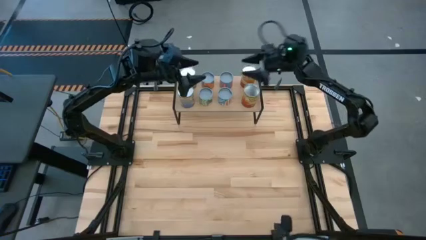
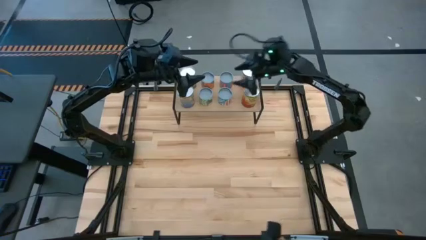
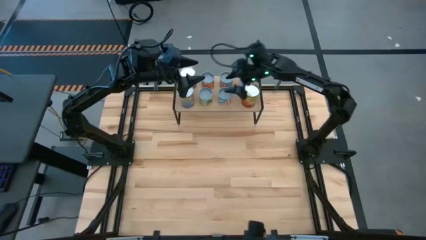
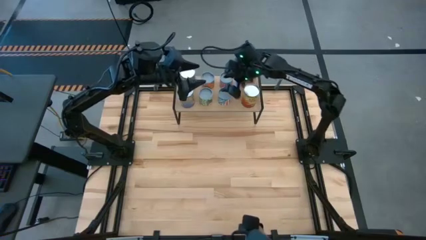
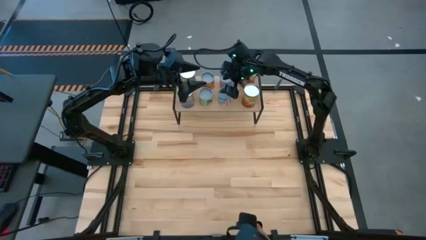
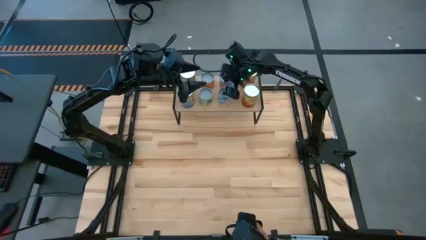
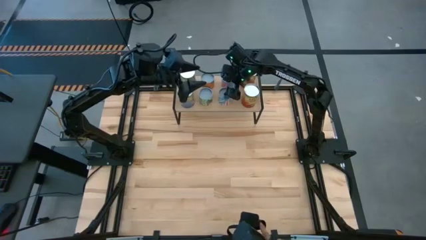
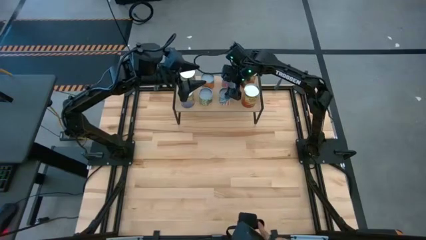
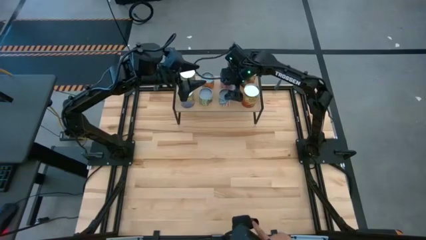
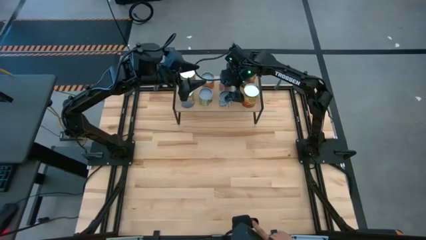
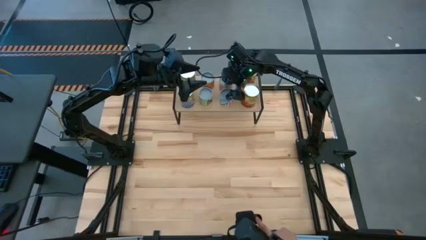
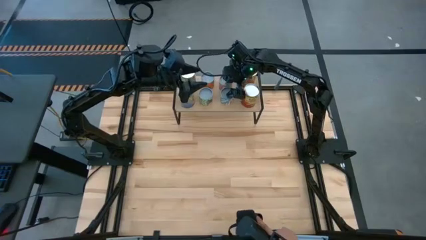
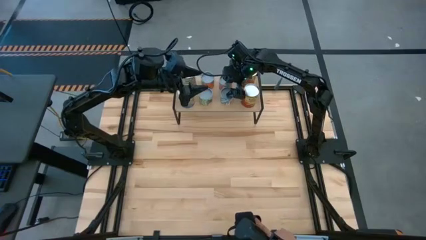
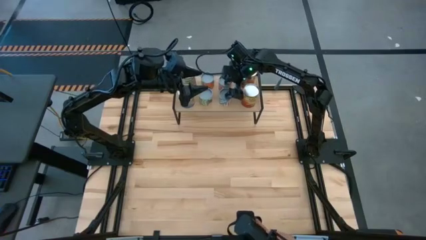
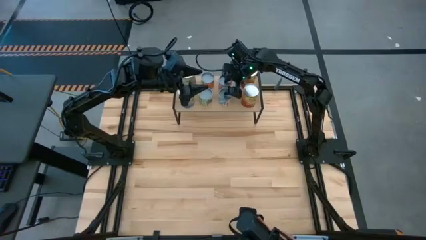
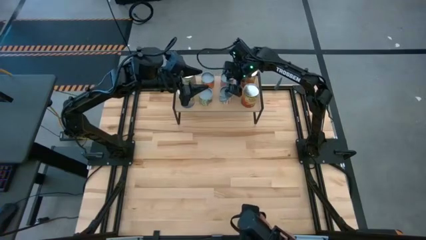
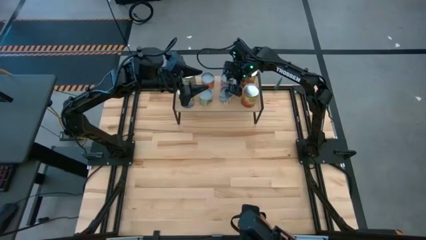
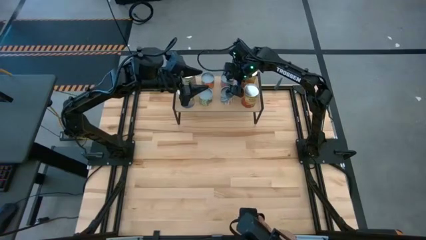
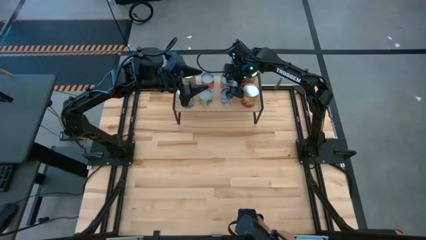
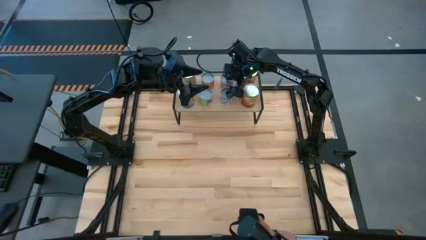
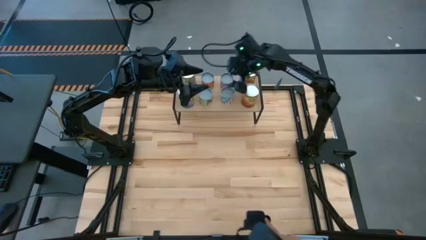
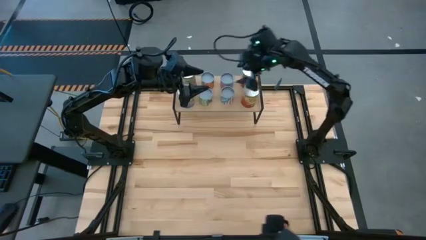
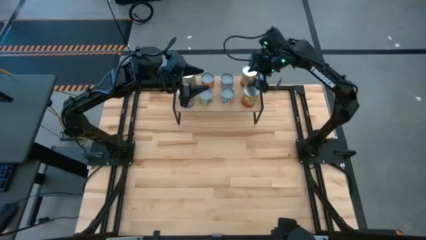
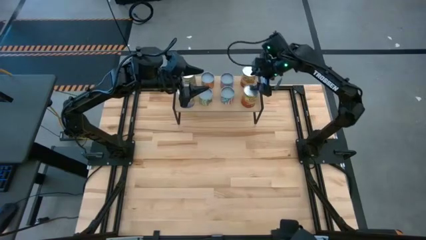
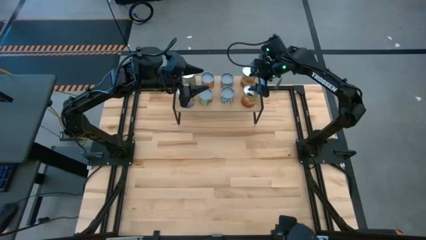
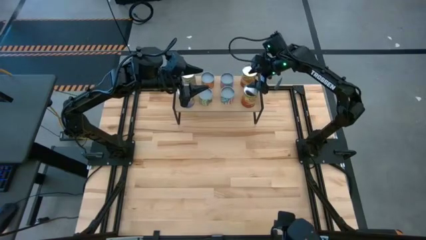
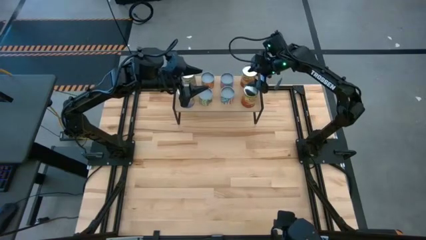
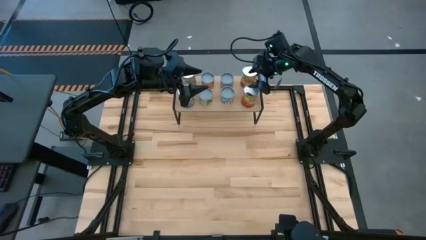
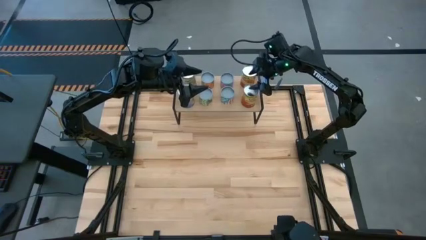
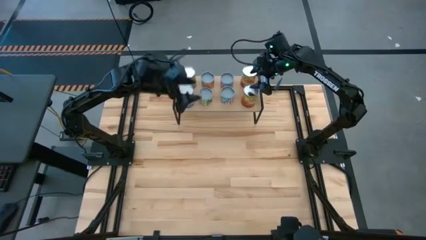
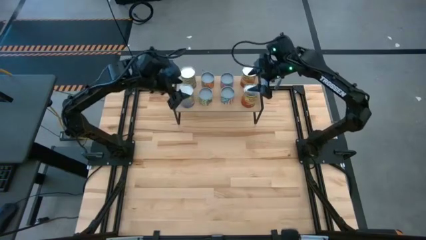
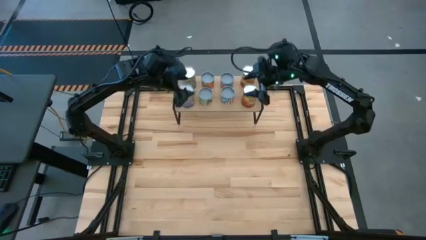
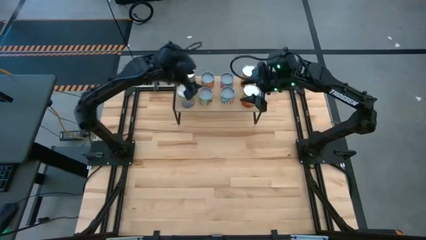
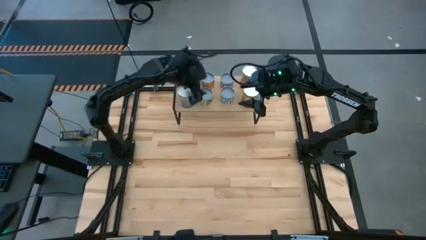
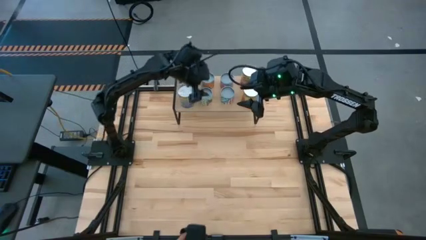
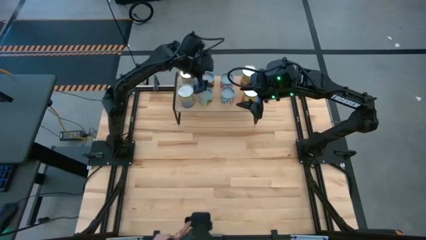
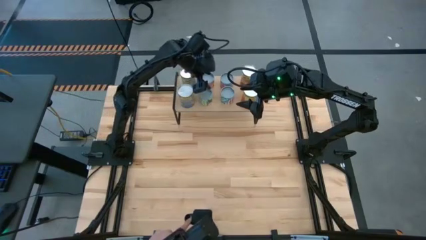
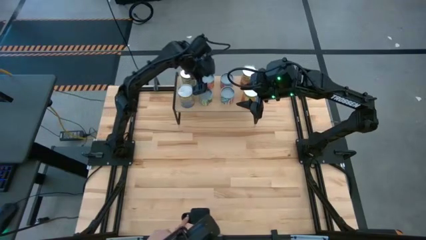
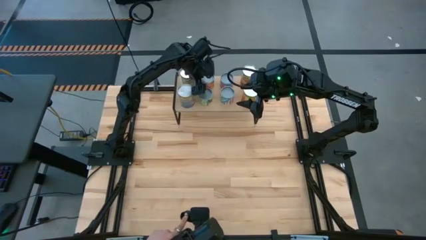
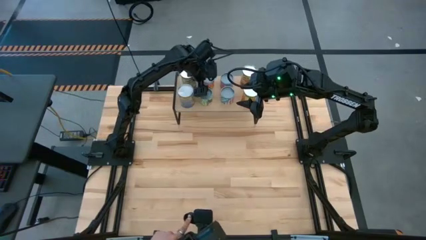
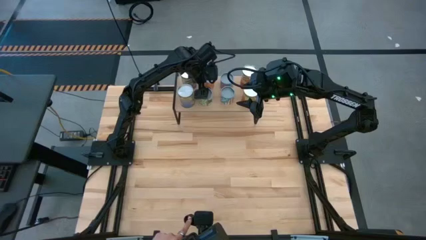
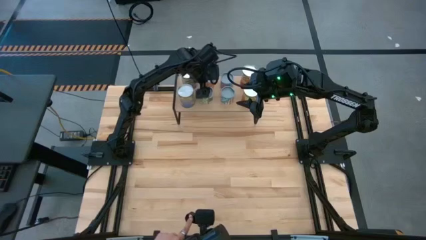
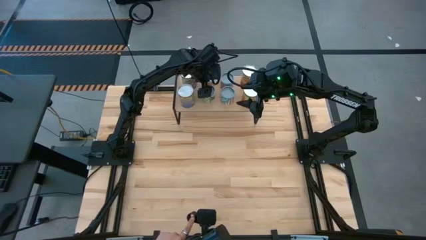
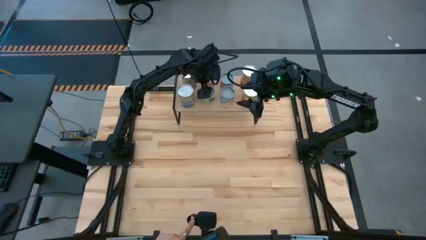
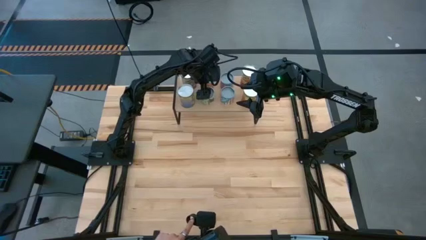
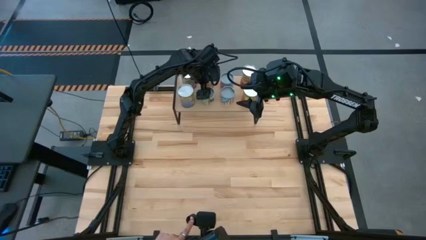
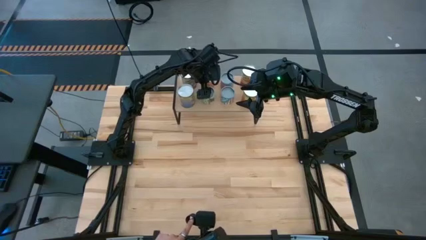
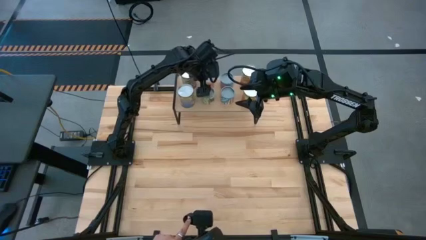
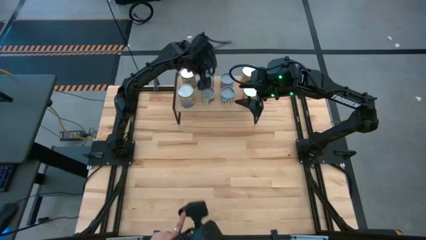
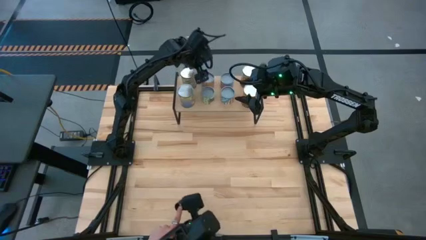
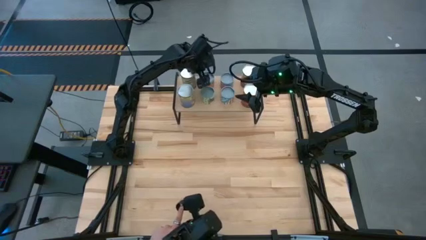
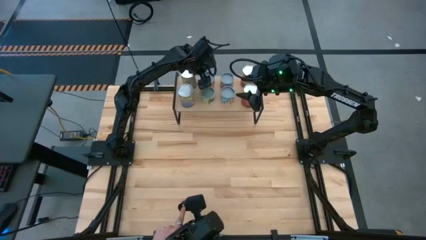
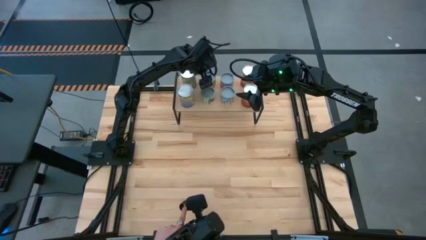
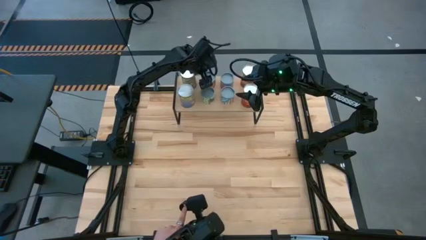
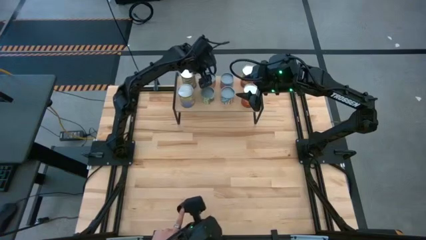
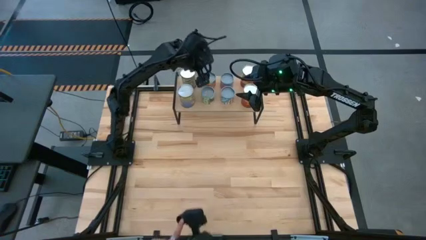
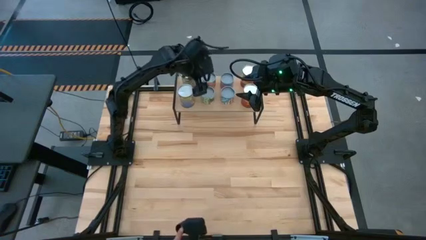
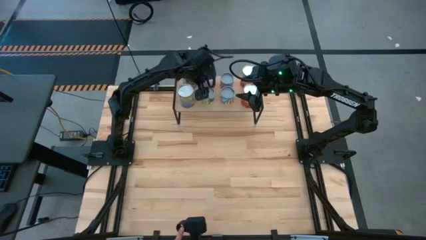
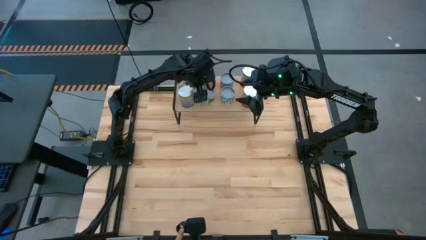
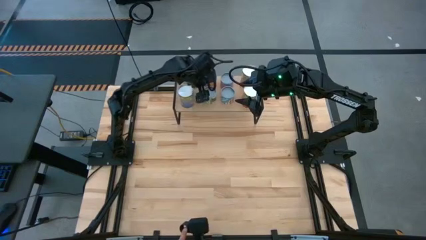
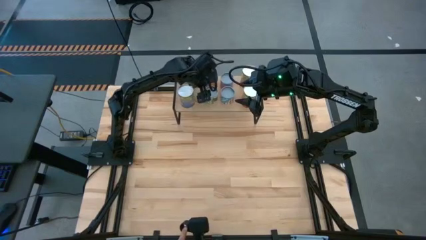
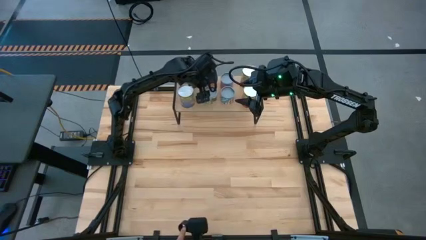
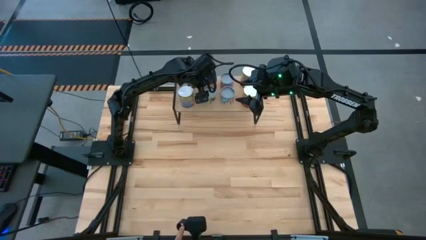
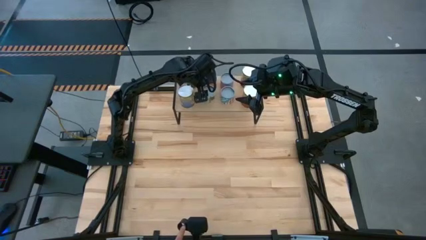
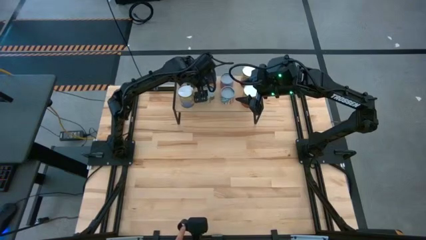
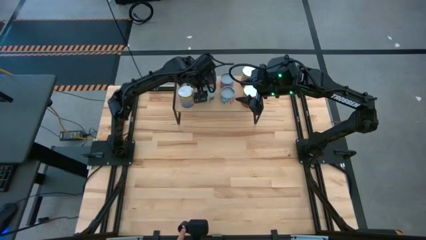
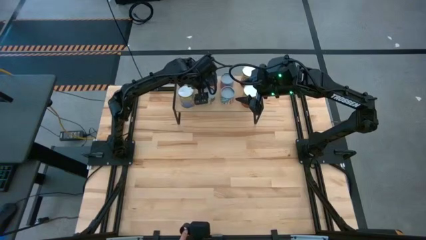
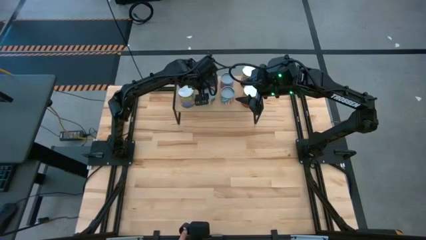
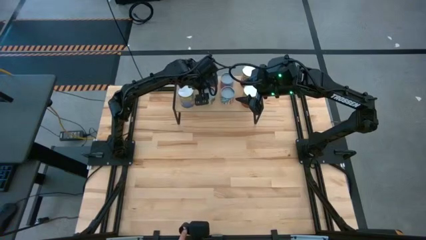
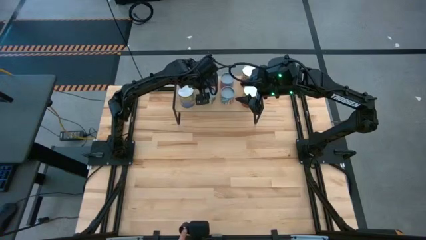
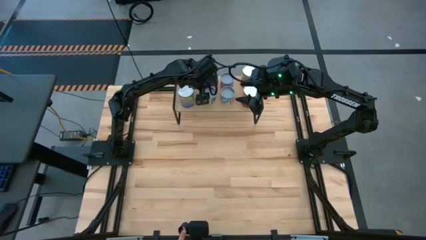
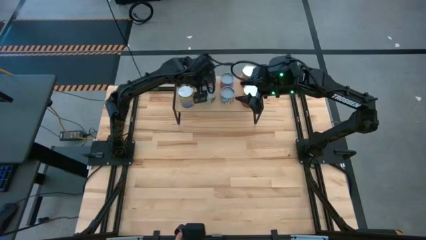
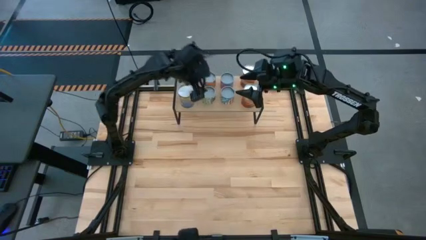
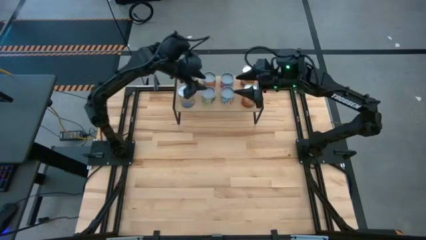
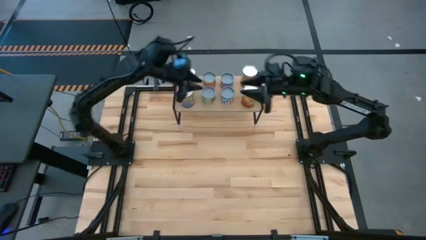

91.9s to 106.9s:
Task: Pick and place cans onto a shelf
Adjust the cans on the shelf

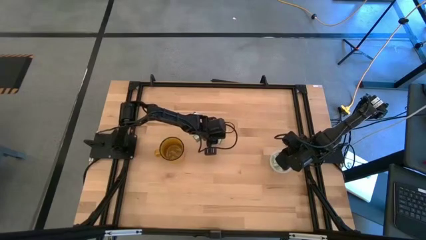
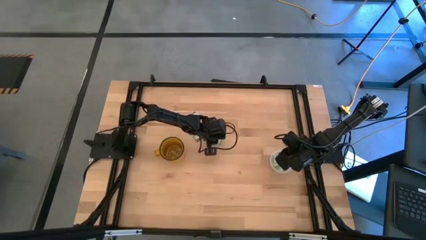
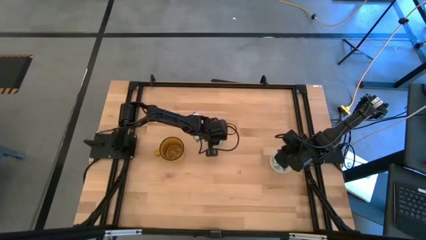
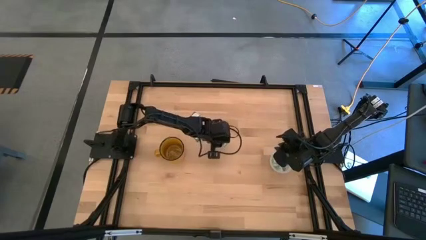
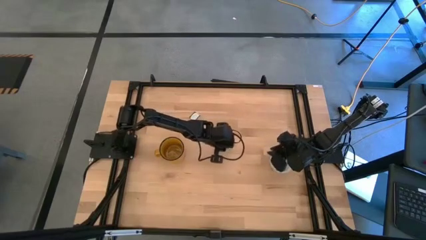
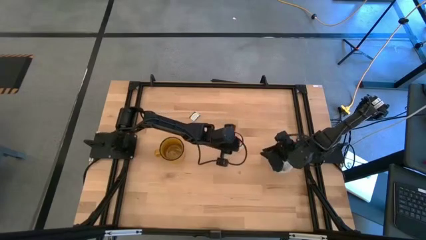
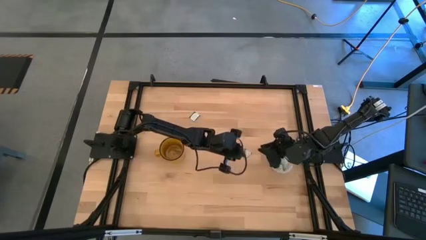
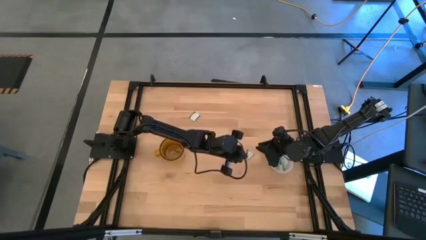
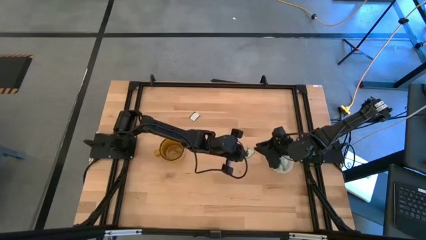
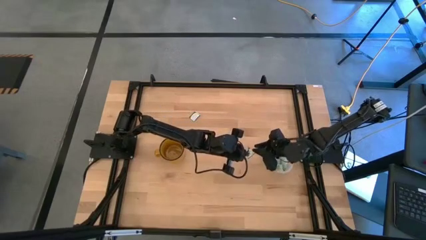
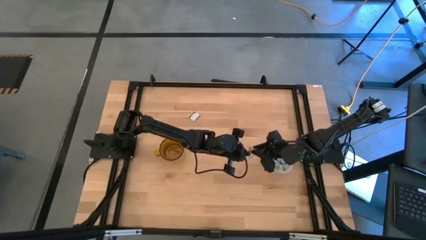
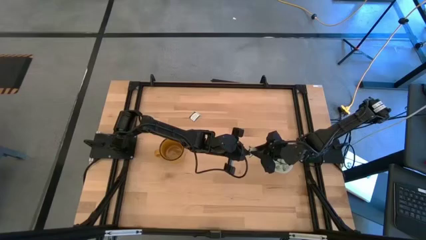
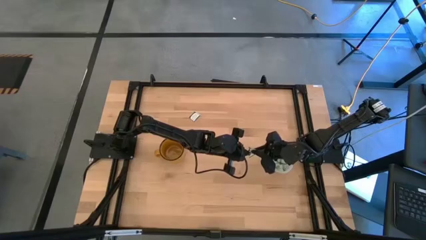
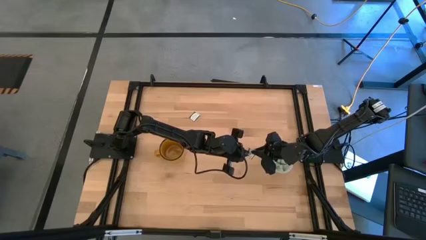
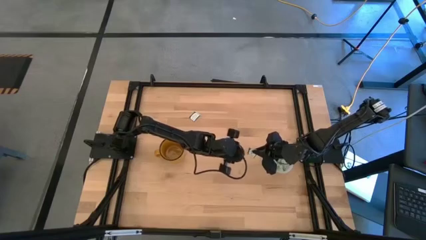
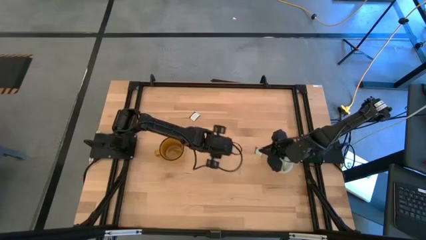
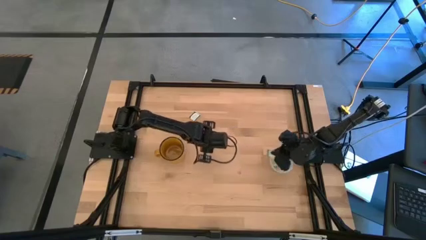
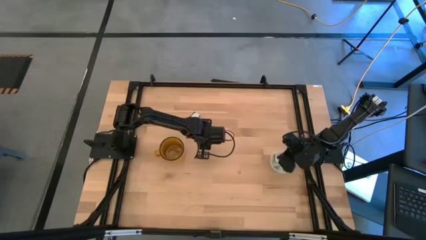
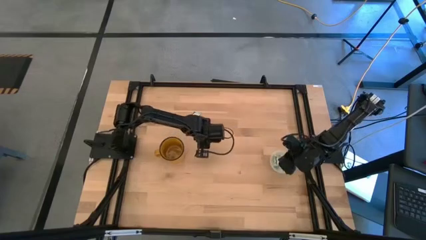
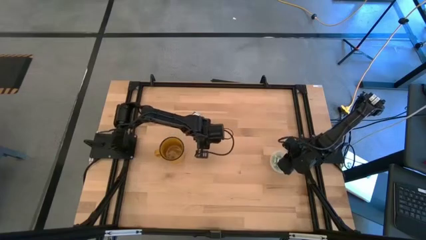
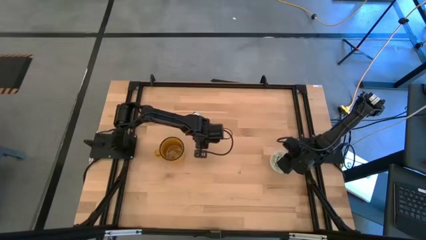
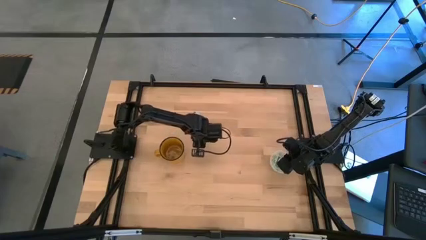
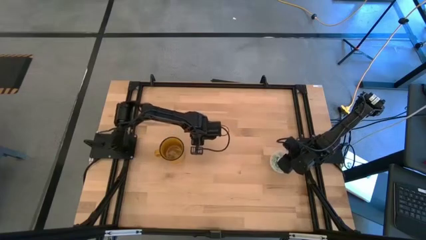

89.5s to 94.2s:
Task: Pick and place Stevia / Truvia into bins
Put the green stevia packet into the transparent container
